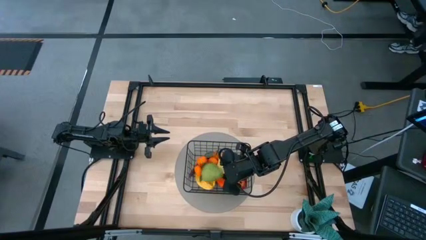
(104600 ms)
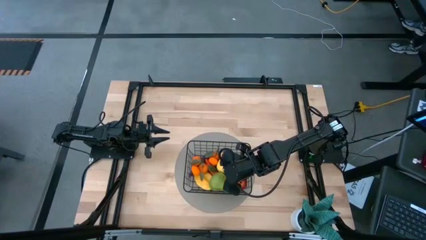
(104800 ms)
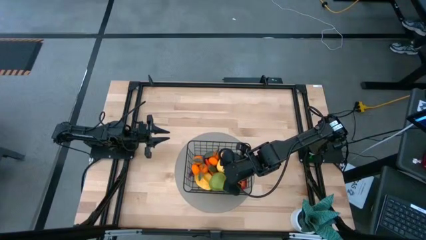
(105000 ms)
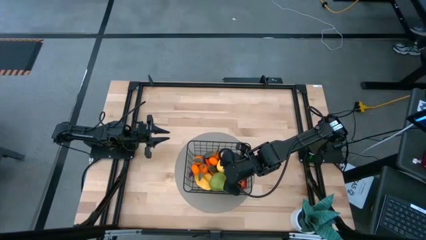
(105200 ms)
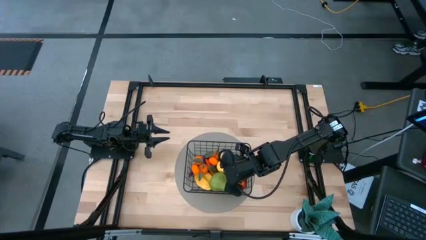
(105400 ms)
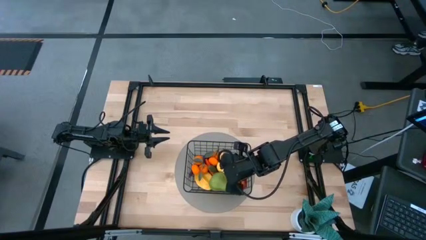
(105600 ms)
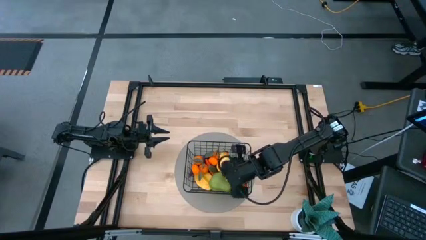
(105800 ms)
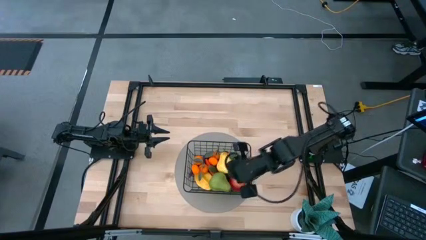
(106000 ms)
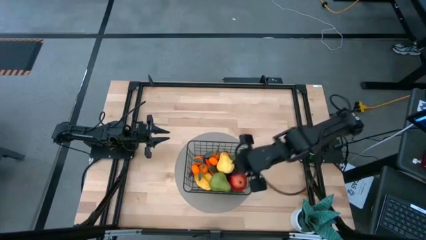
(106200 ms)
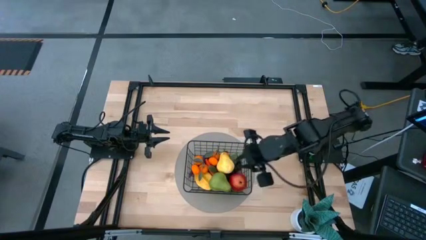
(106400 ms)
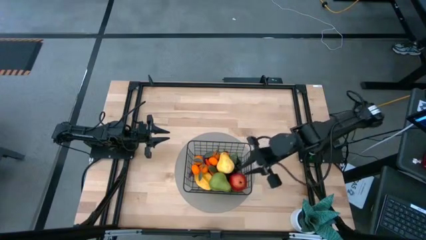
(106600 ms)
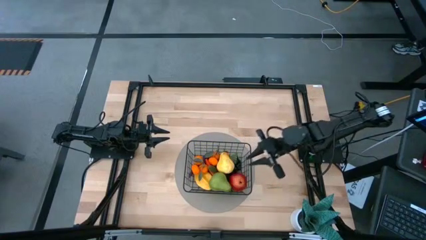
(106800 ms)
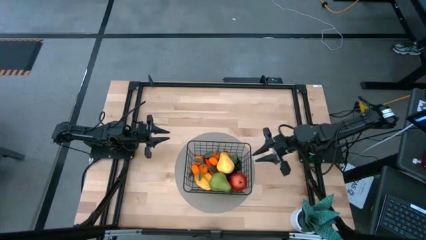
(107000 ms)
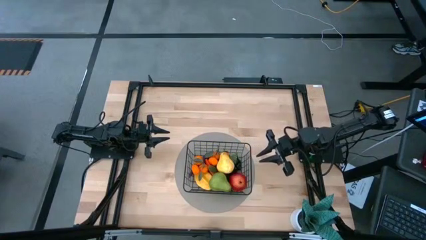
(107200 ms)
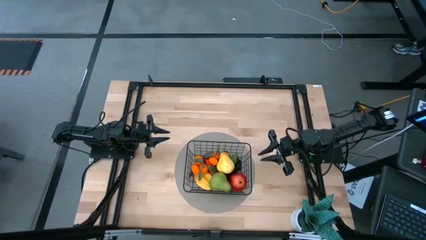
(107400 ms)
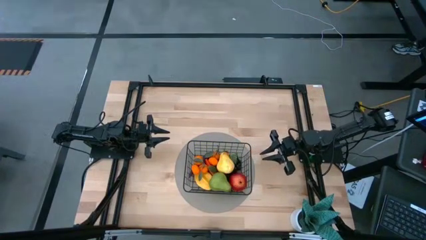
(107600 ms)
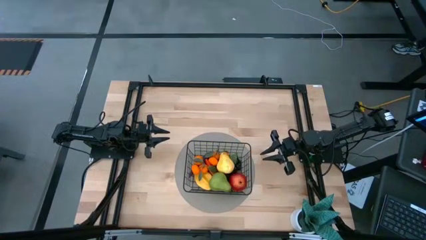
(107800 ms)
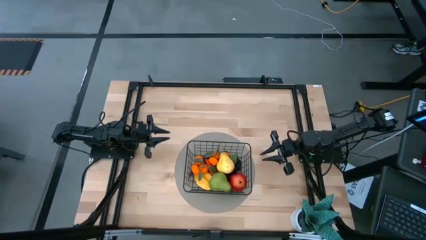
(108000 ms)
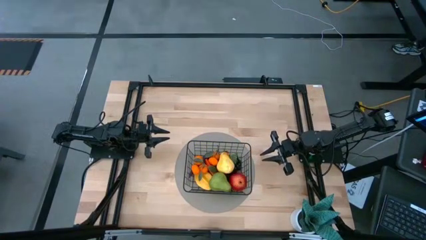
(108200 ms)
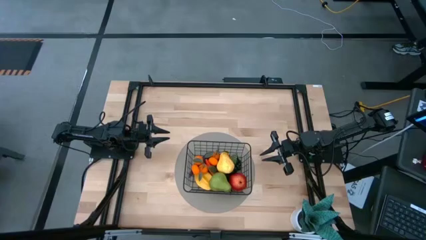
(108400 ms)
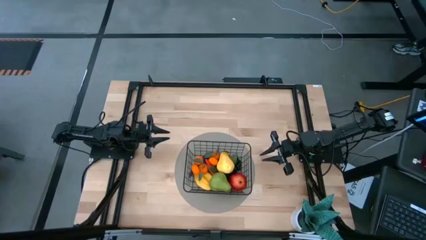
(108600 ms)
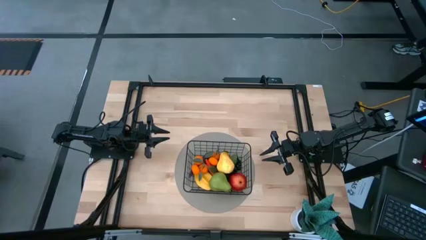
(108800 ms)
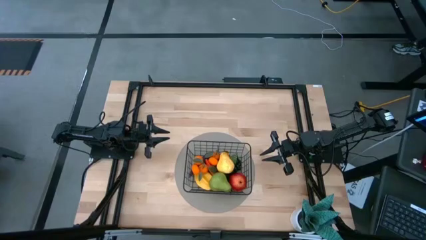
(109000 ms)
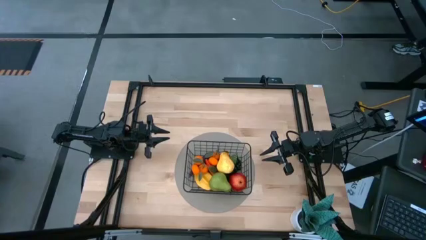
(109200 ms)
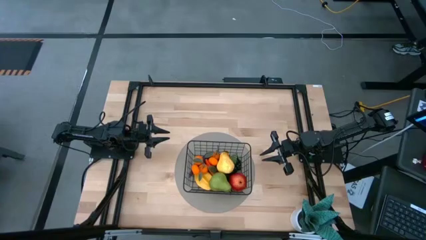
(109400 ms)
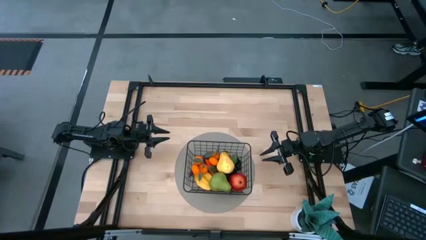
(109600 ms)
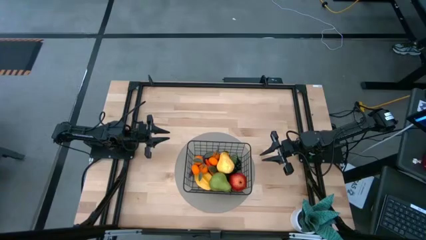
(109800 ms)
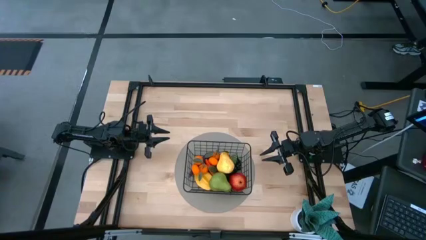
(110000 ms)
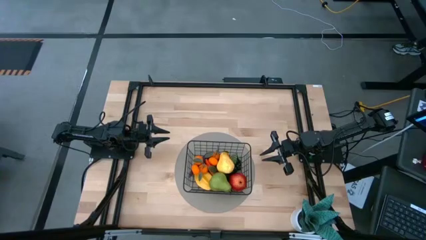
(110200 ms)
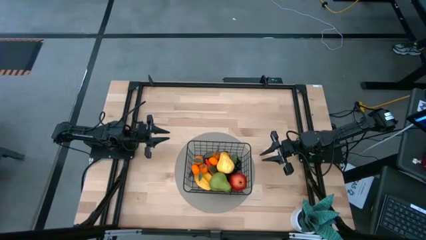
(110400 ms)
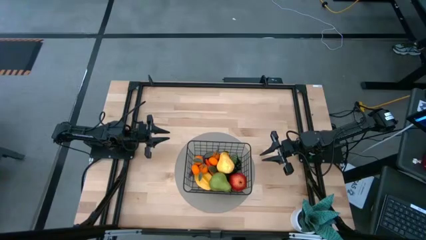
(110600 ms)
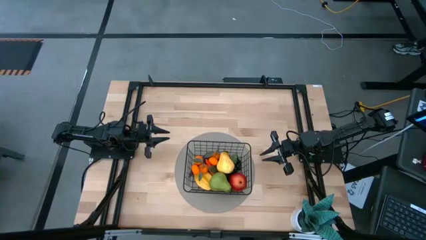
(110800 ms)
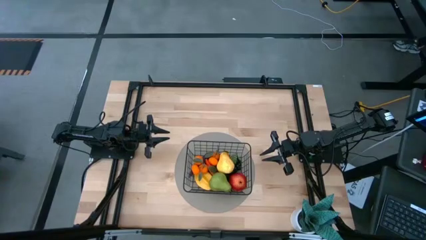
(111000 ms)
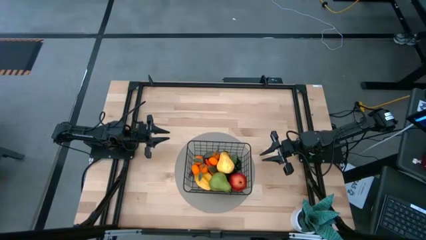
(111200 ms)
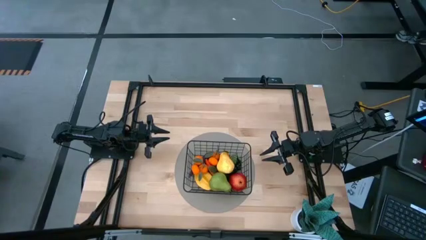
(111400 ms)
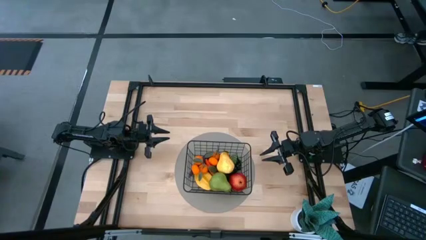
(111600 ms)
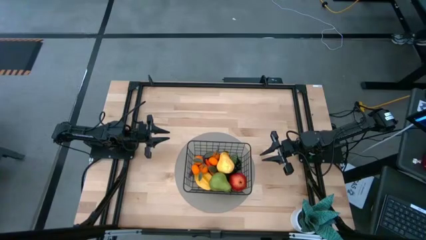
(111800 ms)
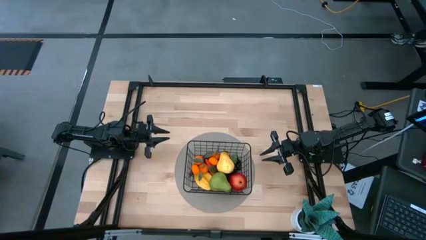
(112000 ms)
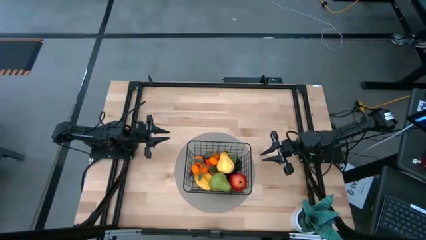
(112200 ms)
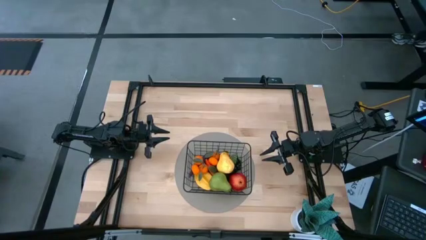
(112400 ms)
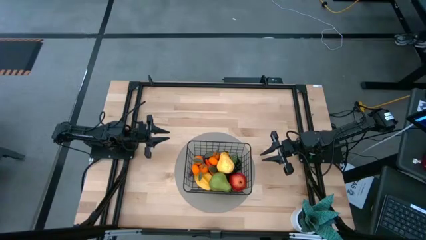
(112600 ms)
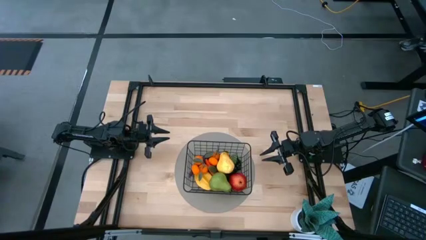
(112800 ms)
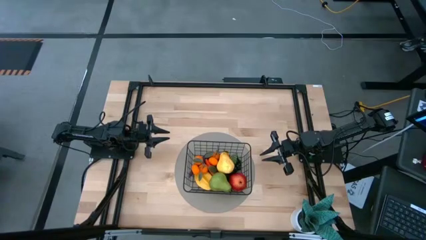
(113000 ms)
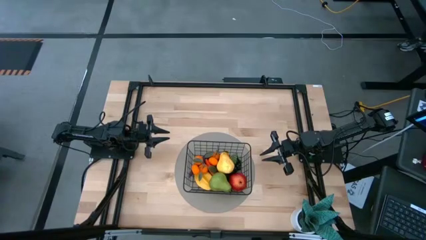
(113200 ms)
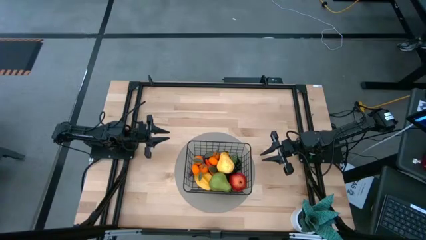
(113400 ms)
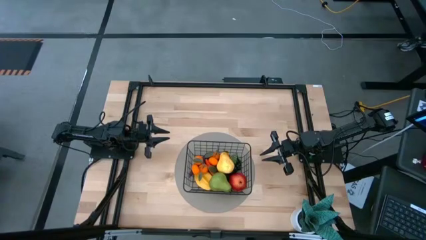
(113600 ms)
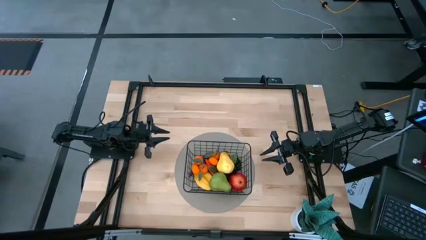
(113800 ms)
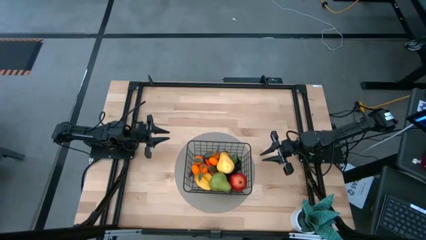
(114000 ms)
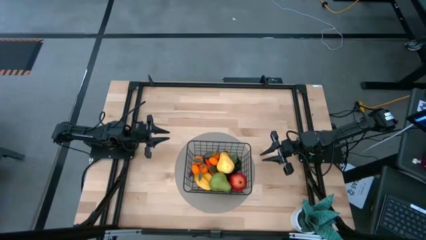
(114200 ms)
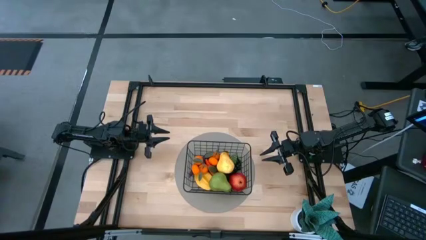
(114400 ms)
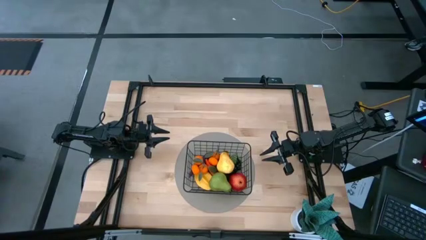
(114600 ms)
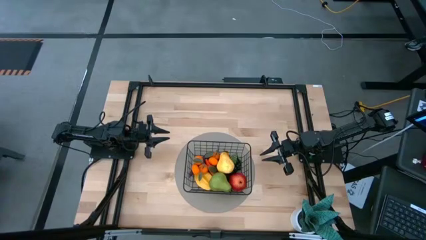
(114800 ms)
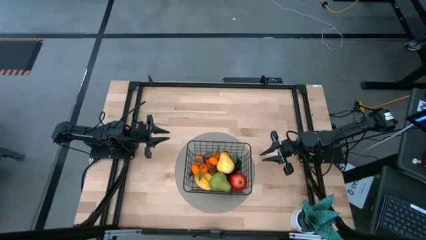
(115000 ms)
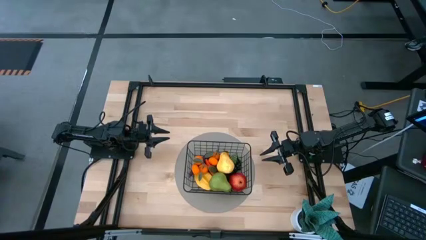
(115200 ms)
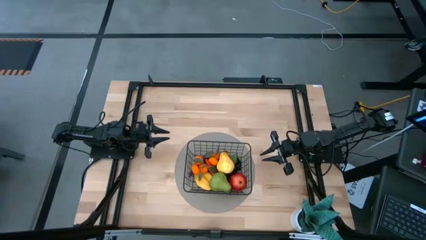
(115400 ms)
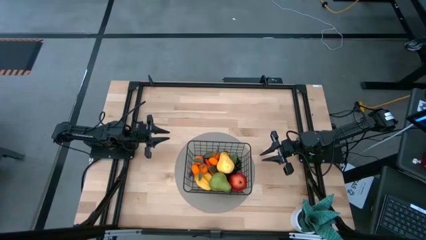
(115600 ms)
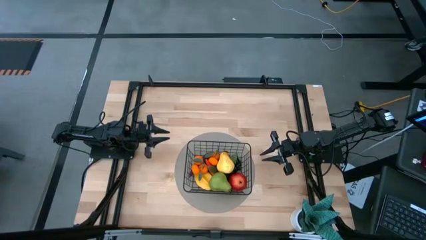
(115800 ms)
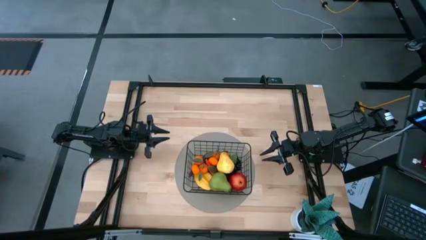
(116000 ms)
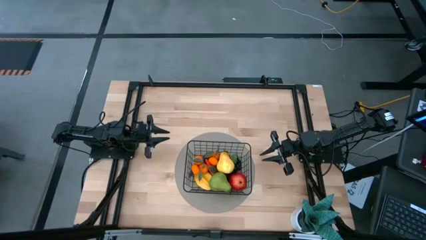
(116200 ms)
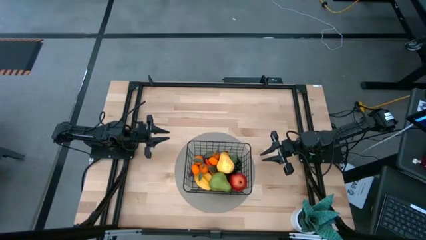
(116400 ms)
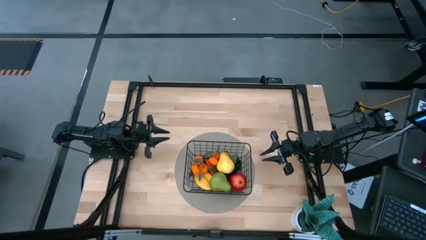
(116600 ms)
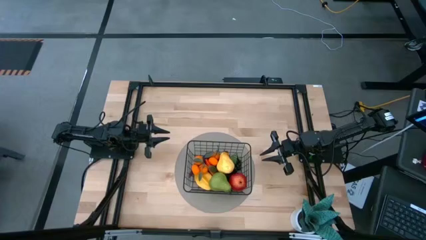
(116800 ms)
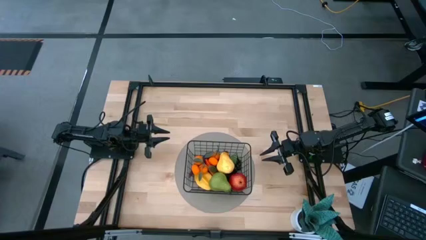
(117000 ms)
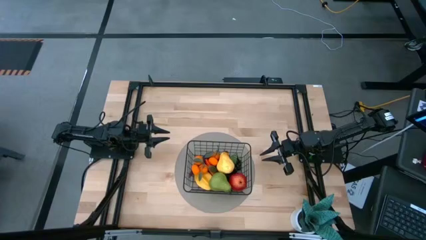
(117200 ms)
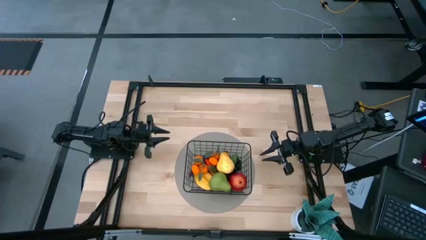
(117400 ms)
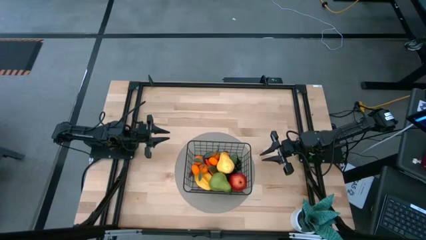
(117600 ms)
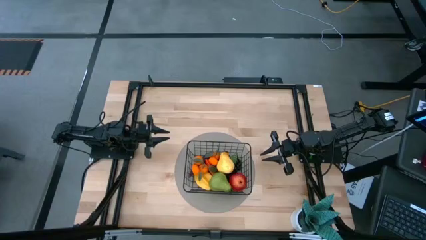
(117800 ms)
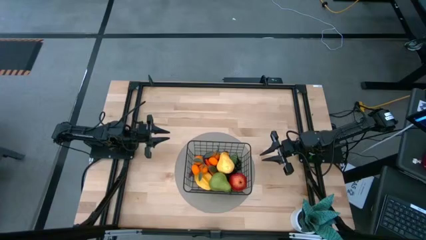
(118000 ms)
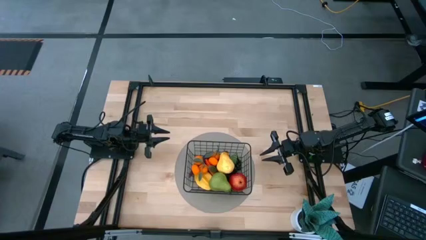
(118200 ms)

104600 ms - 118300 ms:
Task: Build produce basket
Return to home position

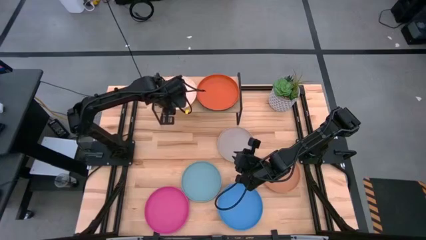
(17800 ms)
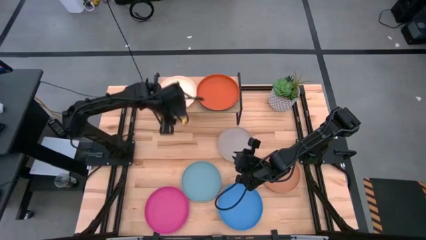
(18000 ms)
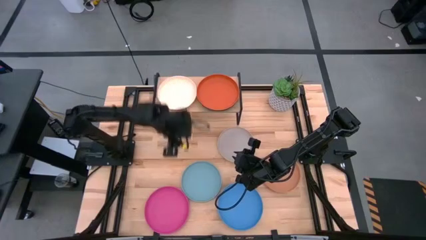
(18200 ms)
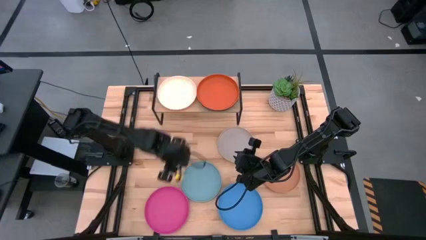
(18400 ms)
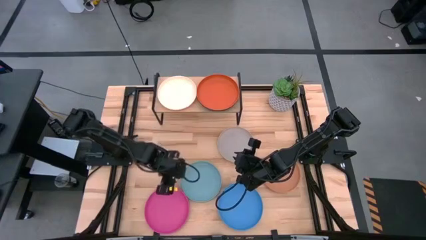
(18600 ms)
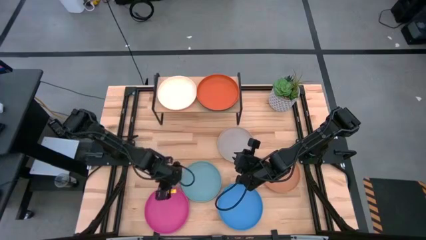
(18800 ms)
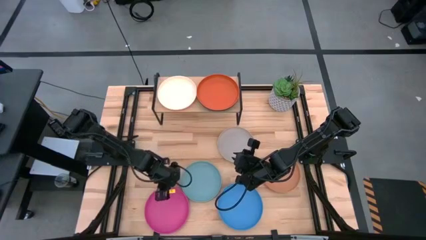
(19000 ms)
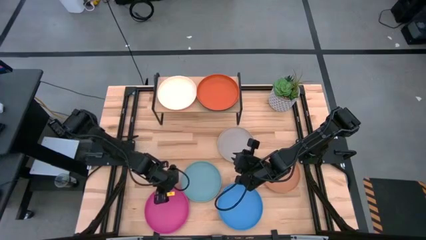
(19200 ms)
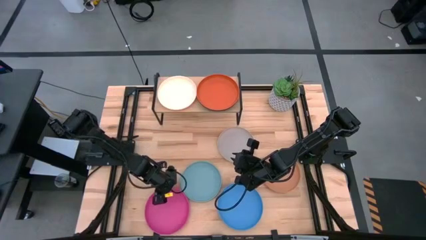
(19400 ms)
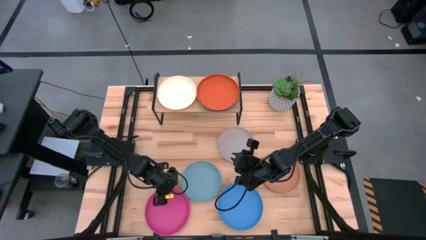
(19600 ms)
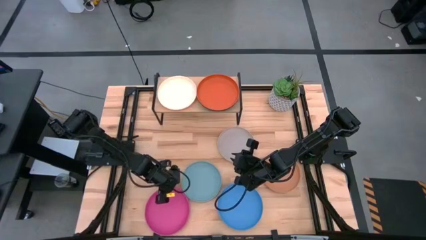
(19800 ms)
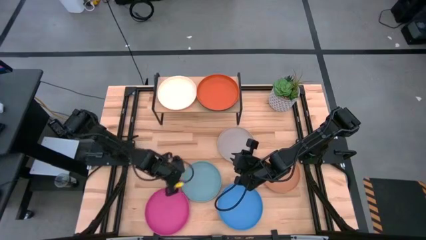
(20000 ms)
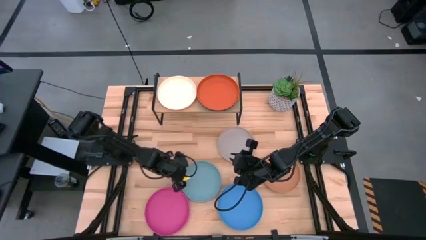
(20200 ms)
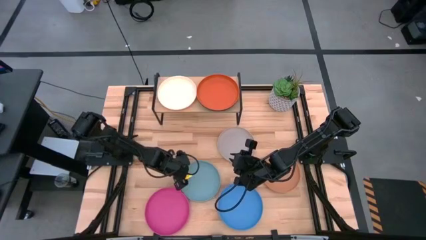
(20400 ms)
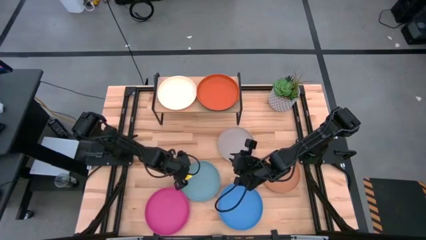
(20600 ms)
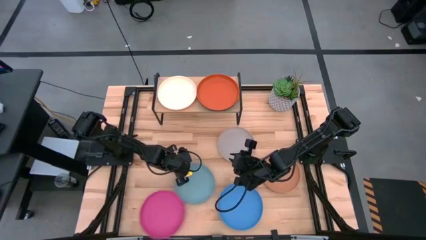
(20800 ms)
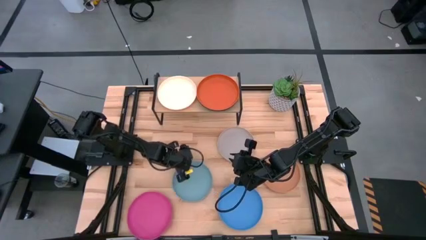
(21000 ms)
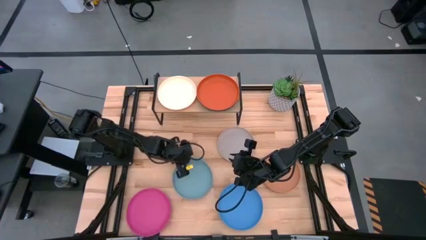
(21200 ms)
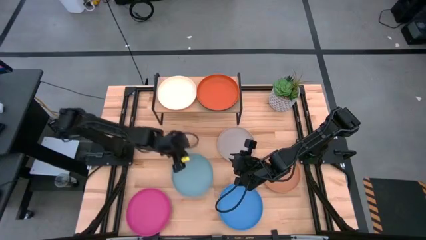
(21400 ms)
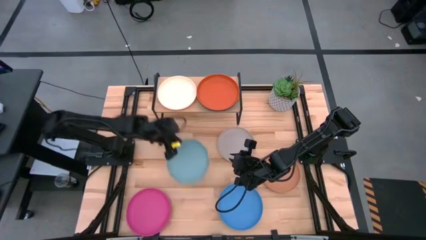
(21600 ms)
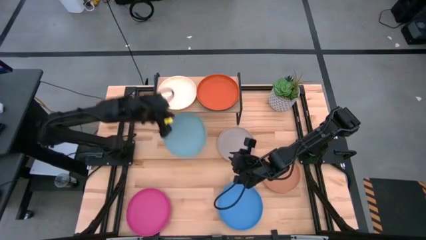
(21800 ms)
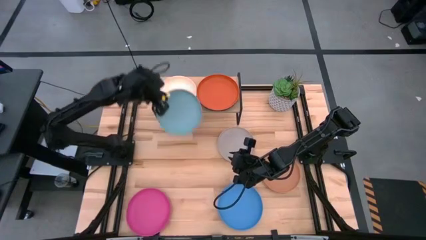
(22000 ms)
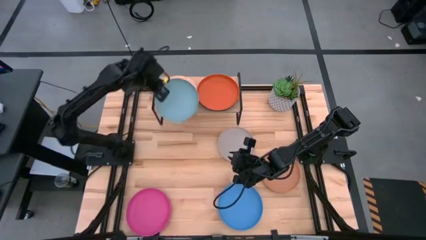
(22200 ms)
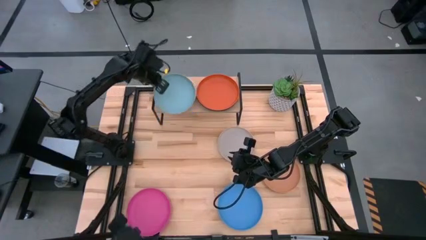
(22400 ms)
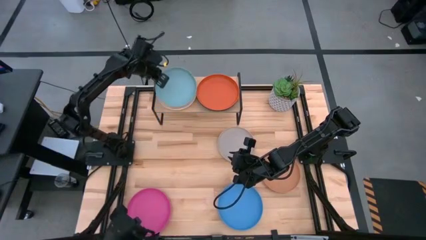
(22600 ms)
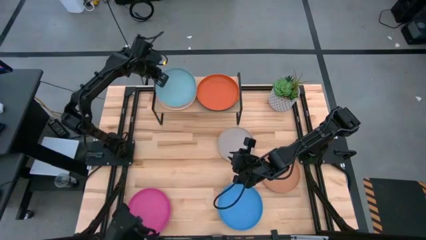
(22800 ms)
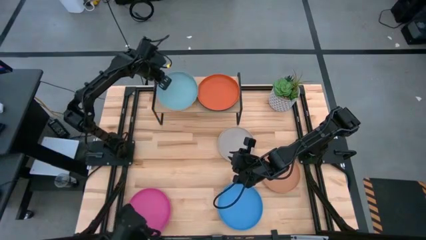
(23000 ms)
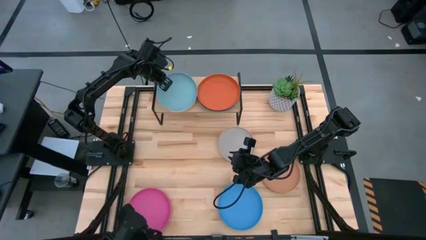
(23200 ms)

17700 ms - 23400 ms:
Task: Place and stack plates onto a shelf
Stack the light blue plate on top of the light red plate on the shelf
